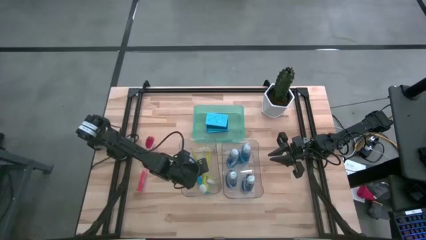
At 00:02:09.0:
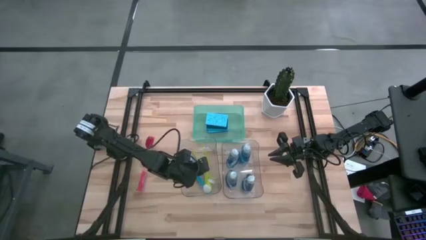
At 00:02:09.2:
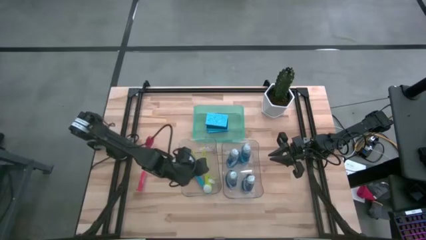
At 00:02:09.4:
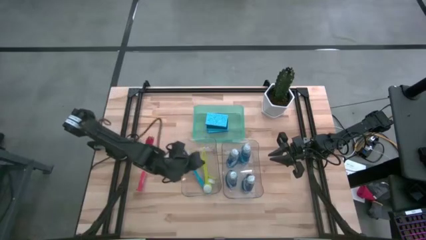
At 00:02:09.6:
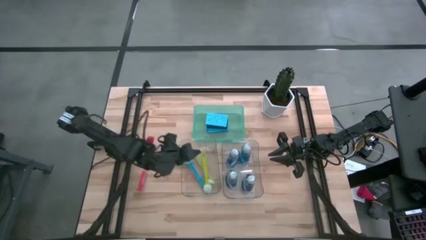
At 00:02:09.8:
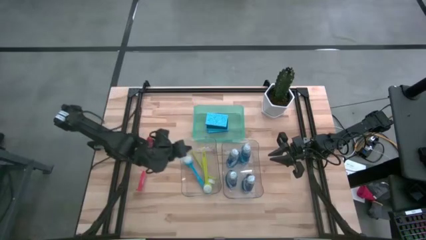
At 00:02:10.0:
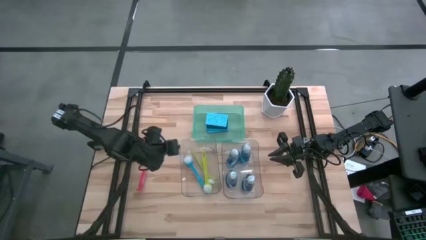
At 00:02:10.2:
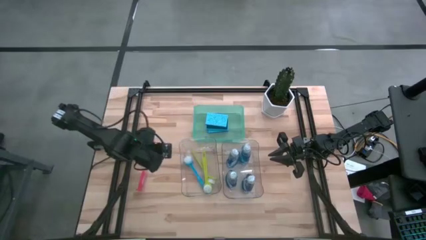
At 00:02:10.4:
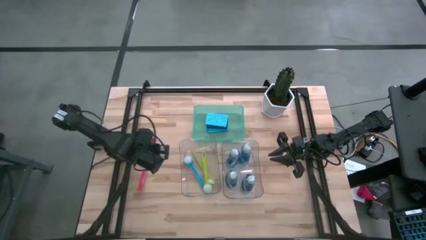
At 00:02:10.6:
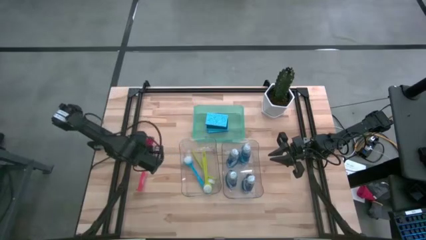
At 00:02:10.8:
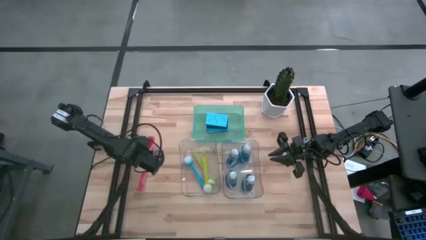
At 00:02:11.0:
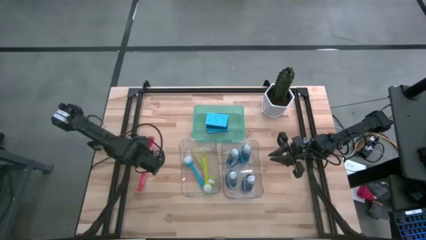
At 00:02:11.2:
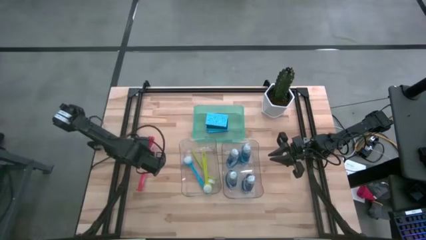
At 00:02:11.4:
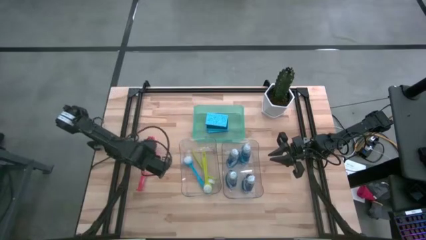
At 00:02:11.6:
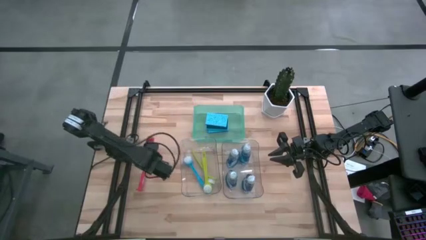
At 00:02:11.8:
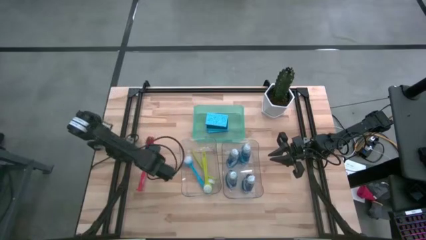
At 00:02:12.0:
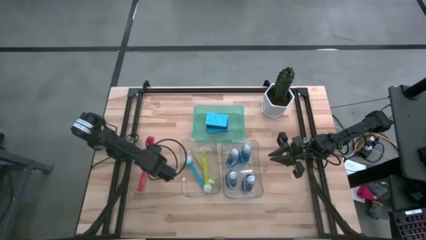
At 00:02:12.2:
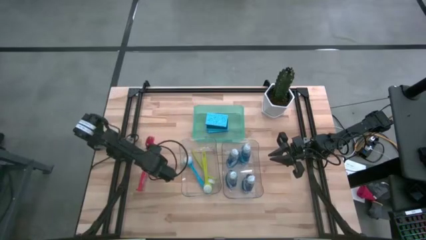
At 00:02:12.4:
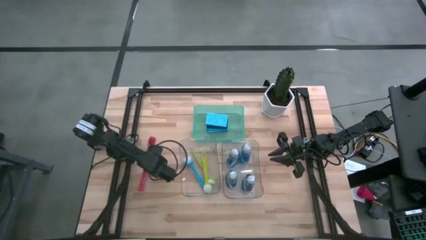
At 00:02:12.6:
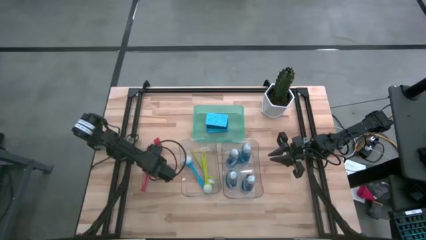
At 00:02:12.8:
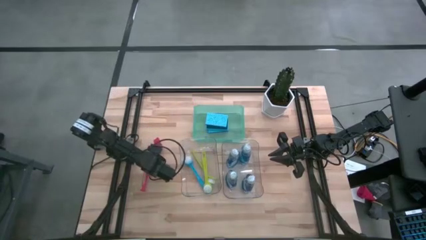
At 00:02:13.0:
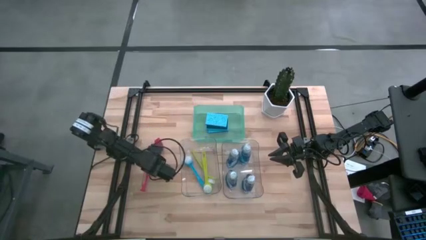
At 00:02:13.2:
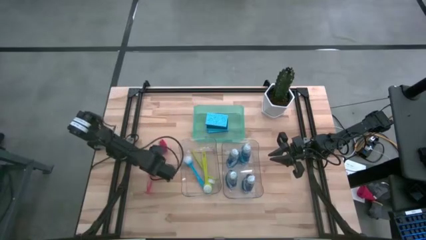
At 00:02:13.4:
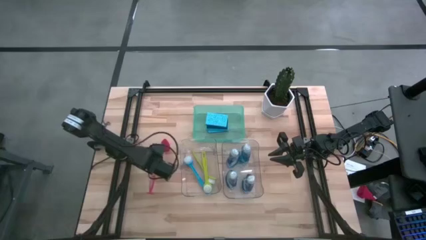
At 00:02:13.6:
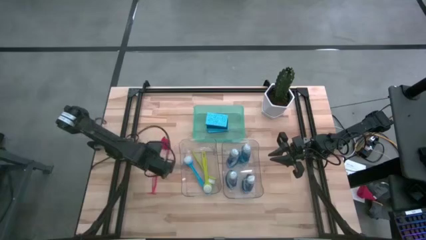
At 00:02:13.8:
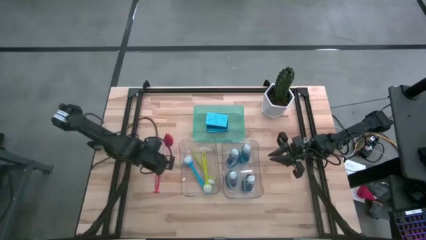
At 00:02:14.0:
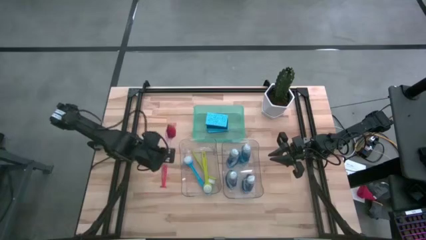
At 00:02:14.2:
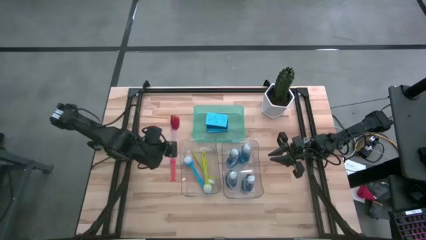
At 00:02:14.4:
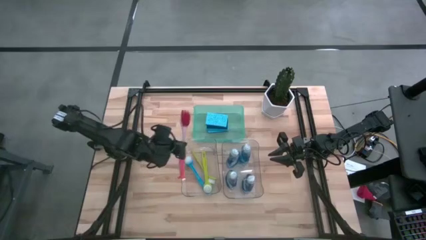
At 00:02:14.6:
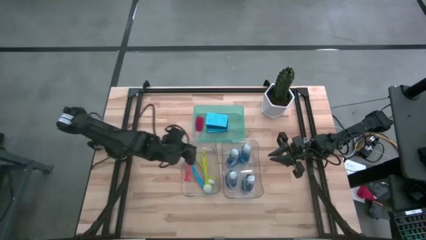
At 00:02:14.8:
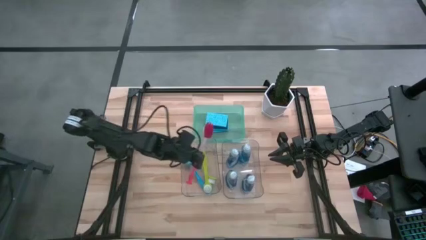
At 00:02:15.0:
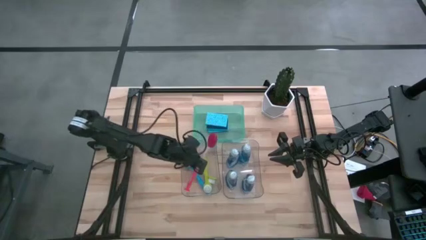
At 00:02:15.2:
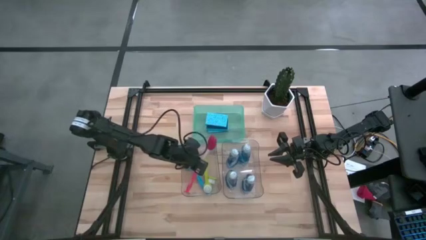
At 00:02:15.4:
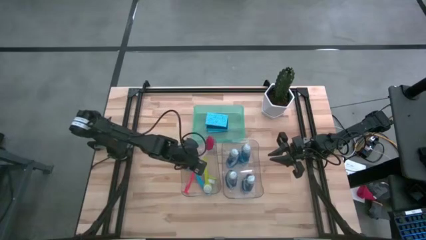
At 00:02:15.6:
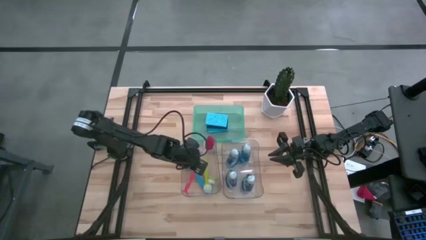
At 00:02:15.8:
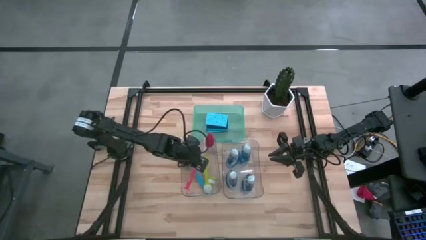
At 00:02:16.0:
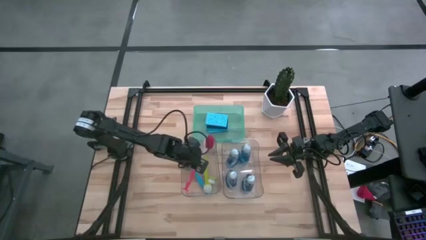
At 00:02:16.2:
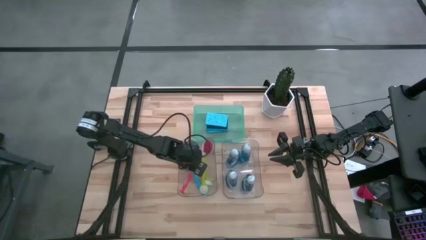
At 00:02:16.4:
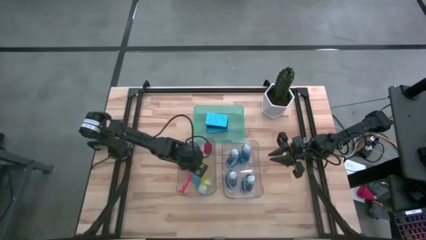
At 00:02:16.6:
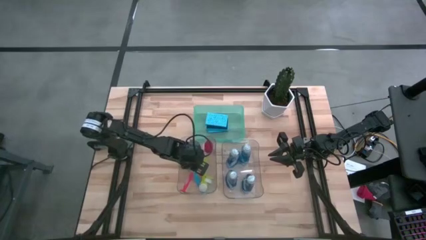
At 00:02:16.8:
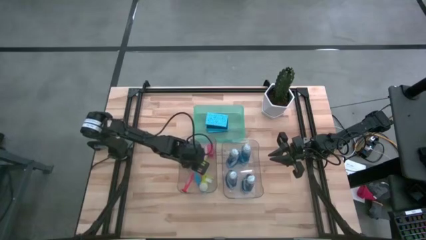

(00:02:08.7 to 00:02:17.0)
Task: Pick & Place Kitchen Sink Supplies
Put the red toilet brush into the left transparent bin

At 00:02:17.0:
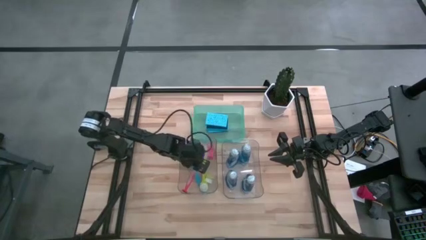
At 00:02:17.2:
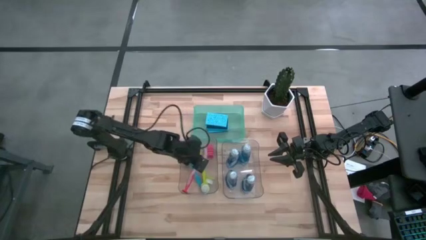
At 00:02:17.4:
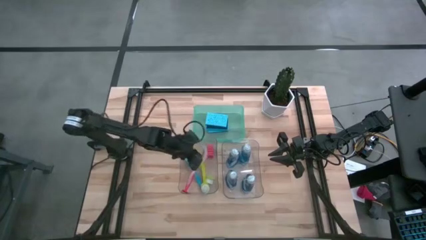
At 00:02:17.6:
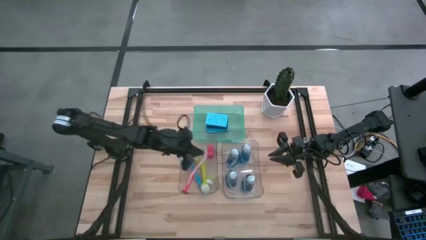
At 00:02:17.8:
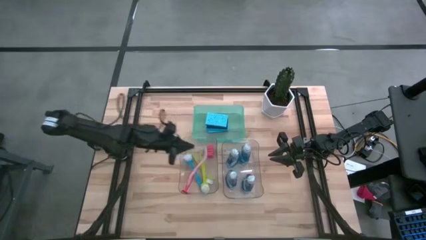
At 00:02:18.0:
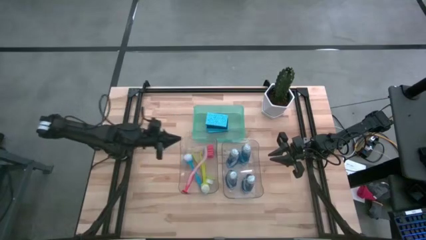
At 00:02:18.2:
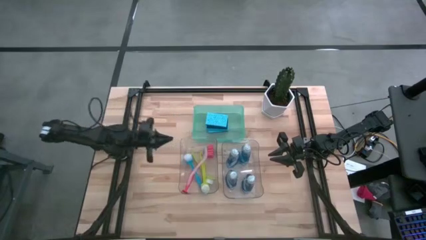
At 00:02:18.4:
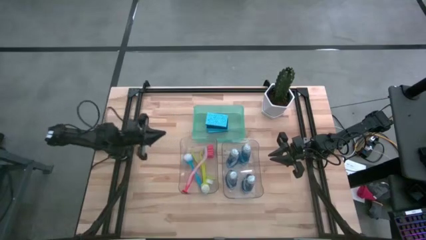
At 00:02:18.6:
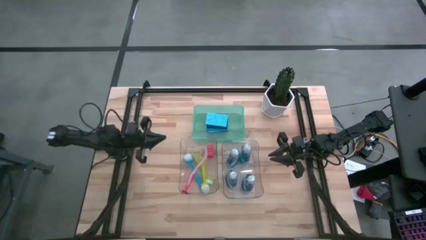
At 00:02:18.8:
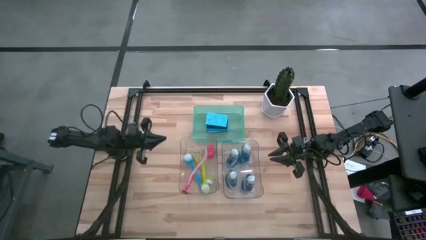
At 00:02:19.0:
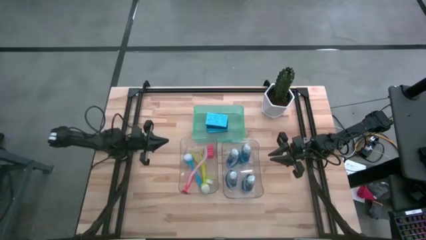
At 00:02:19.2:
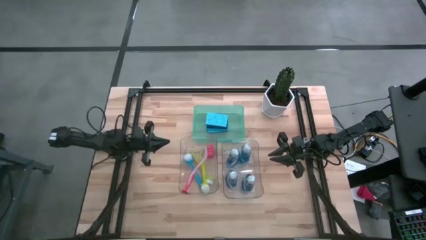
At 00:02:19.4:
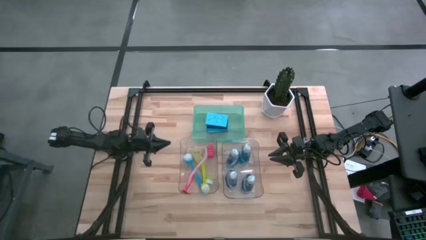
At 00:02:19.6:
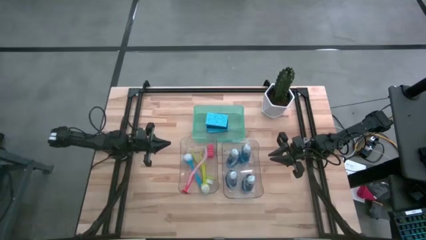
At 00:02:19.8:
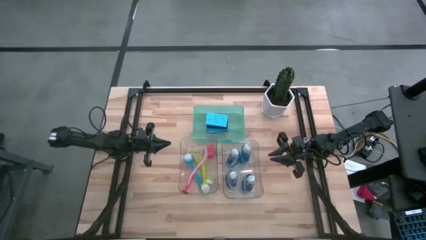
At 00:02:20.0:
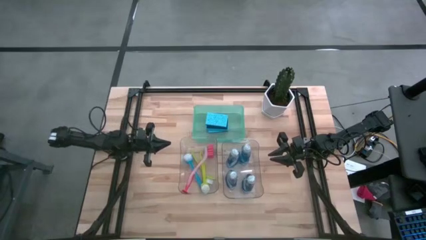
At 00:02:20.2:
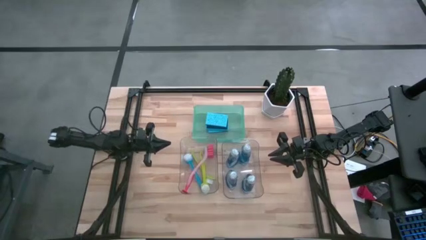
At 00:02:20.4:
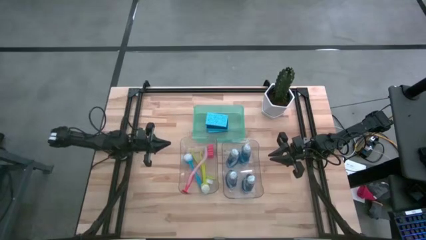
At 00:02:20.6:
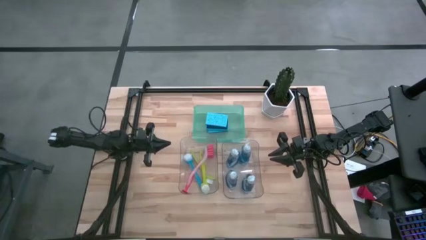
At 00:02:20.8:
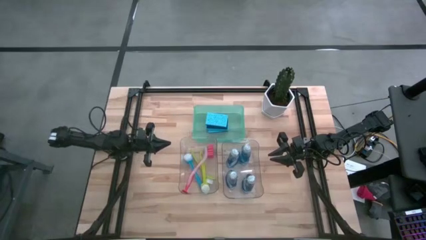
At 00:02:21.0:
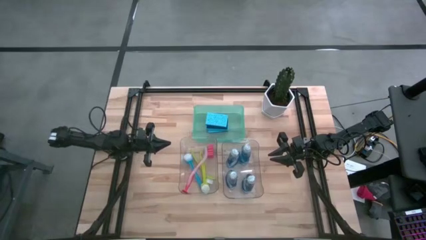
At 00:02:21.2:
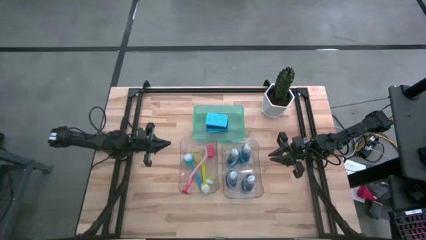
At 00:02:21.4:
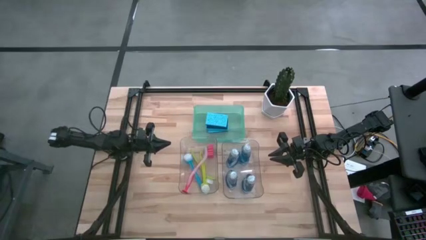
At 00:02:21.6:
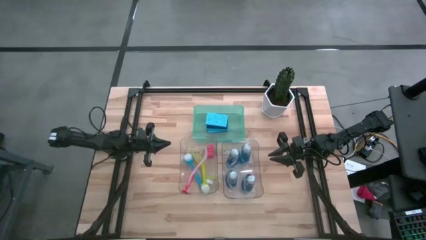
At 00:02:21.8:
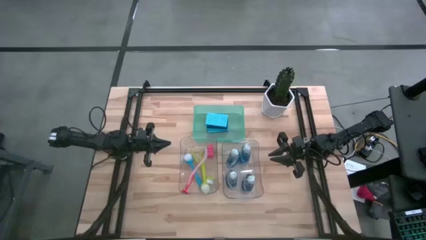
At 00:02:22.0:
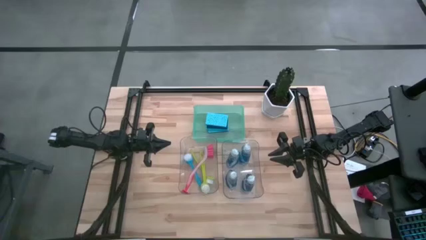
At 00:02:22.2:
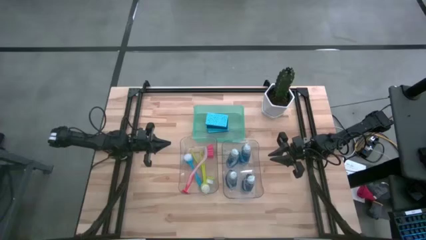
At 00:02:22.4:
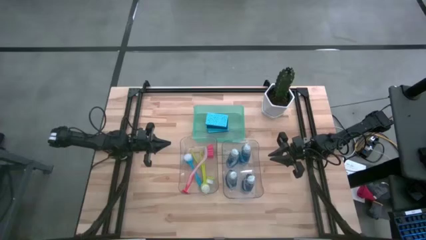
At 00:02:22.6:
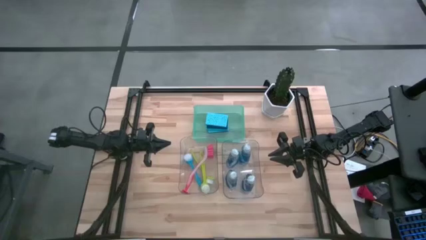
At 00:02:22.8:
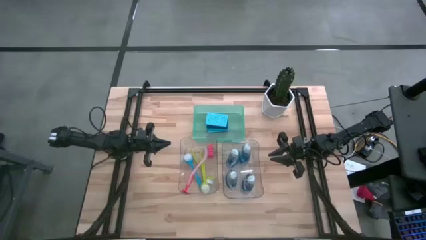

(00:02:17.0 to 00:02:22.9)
Return to Home Position

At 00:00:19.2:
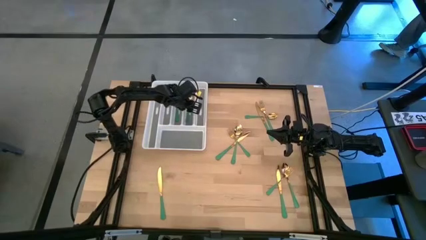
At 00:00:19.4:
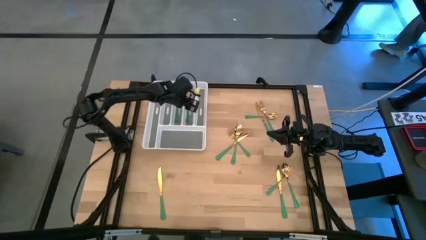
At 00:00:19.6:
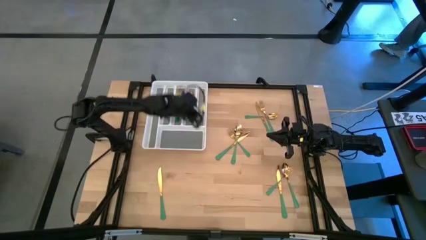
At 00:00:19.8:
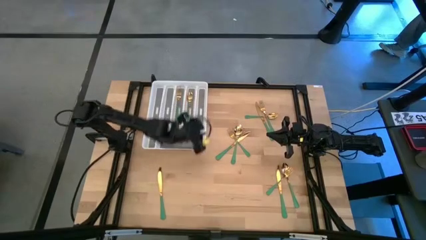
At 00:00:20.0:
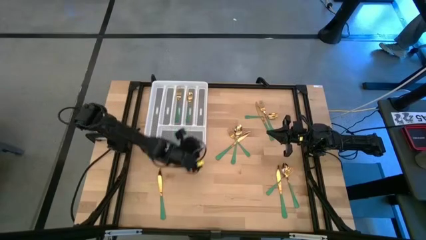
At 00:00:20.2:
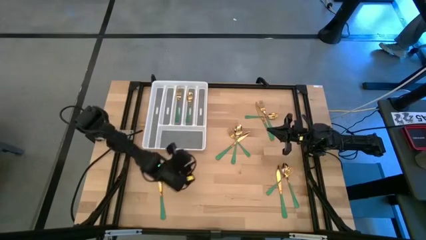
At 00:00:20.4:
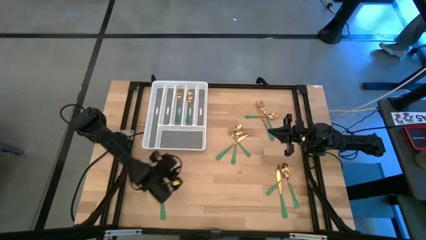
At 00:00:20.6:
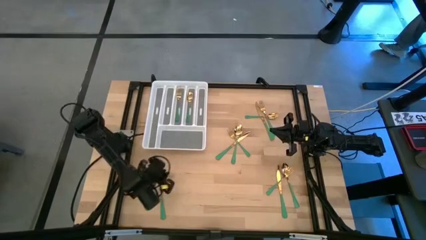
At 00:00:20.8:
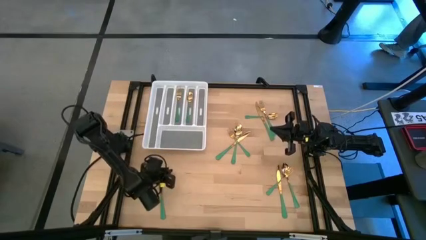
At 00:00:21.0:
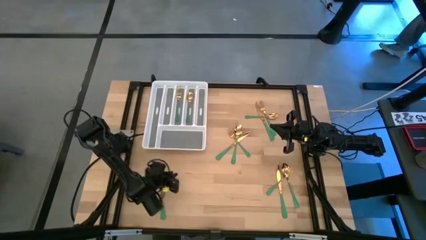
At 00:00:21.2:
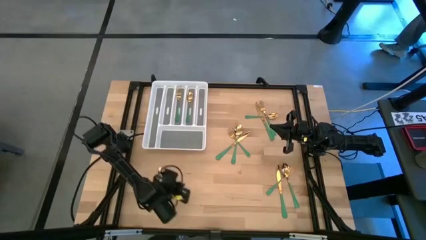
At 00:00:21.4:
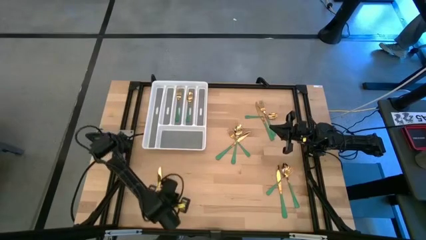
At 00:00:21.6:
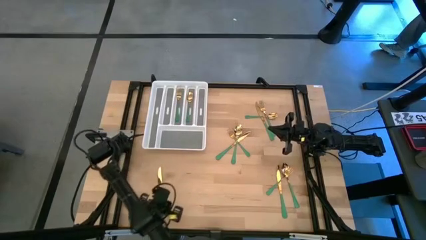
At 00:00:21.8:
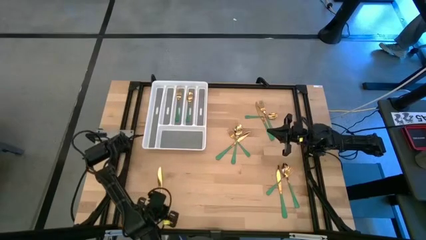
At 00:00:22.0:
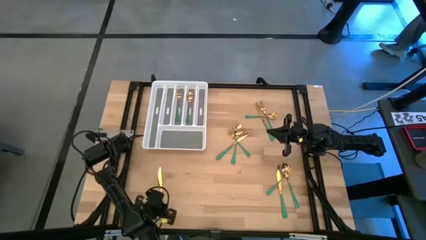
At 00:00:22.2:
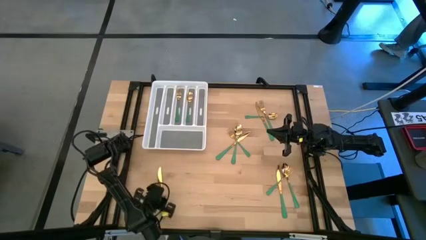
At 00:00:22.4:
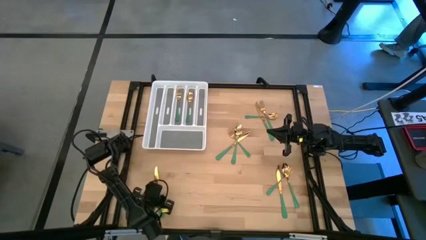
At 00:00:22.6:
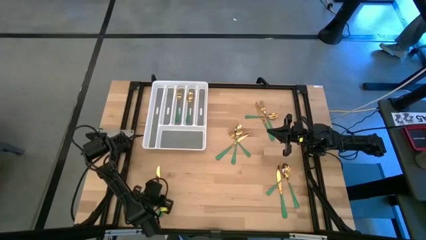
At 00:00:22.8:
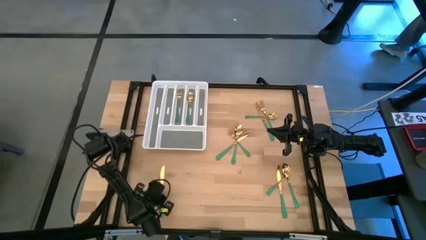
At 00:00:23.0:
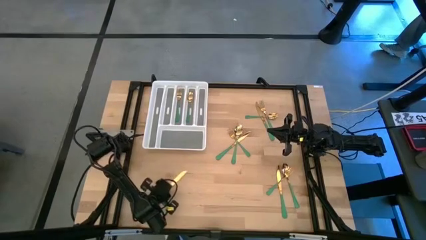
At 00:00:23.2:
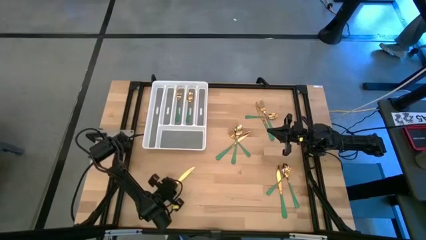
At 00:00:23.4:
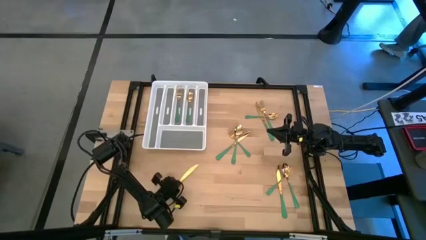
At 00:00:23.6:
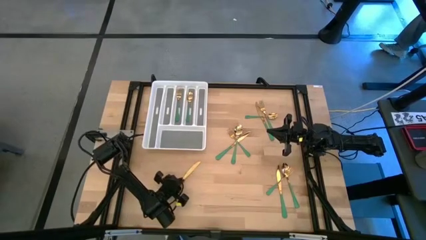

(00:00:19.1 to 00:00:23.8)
Task: Sort silverware
Put the green knife into the white cutlery tray
